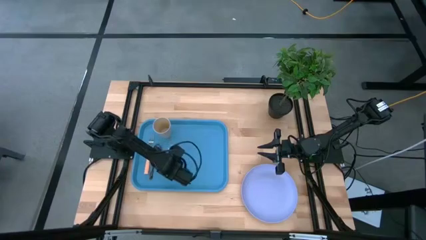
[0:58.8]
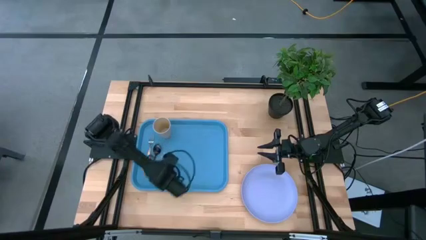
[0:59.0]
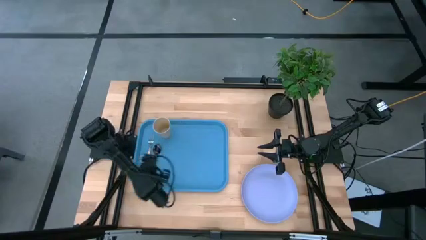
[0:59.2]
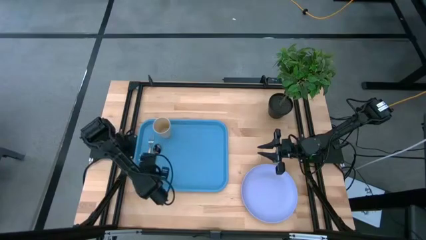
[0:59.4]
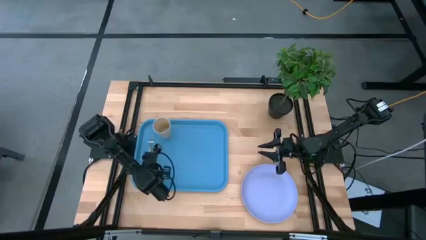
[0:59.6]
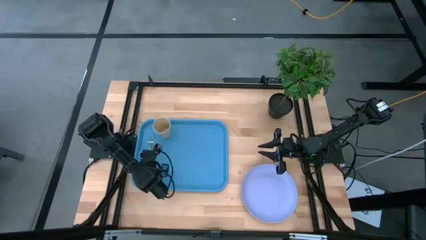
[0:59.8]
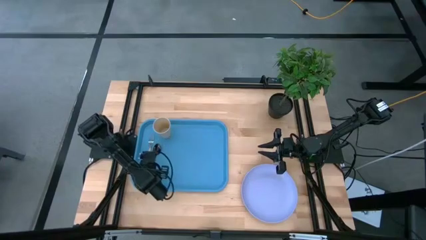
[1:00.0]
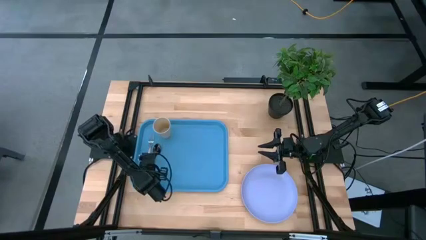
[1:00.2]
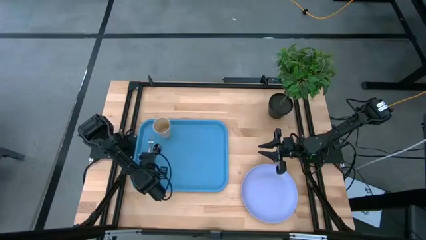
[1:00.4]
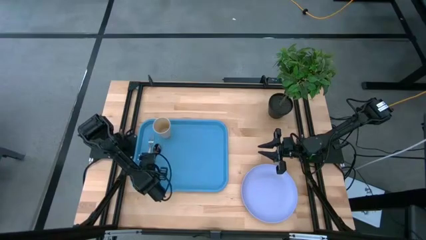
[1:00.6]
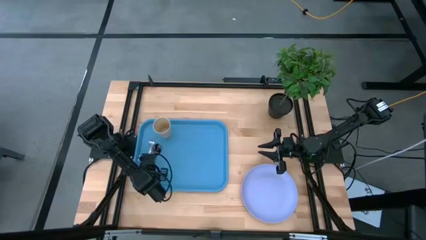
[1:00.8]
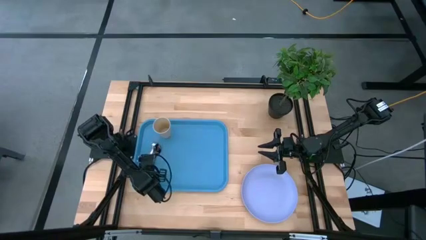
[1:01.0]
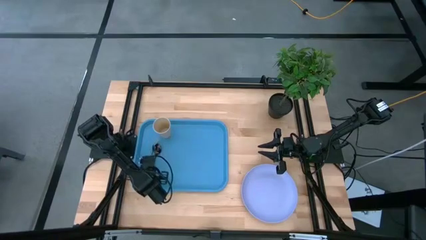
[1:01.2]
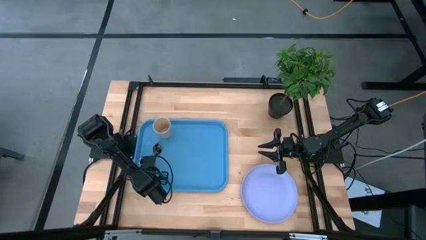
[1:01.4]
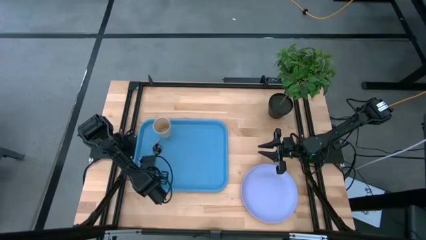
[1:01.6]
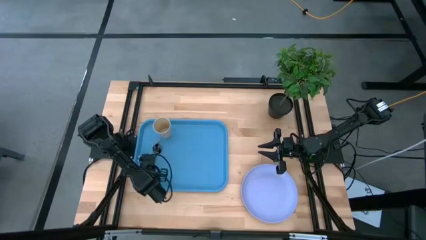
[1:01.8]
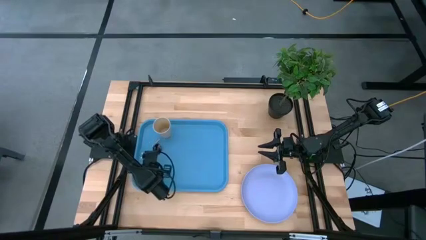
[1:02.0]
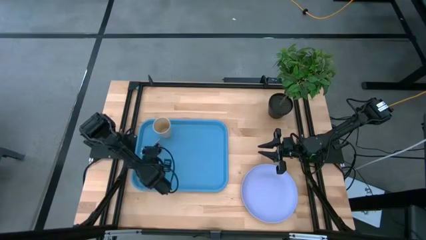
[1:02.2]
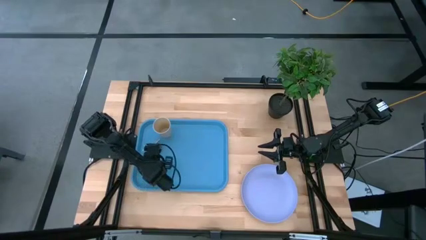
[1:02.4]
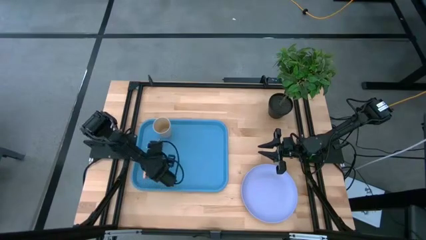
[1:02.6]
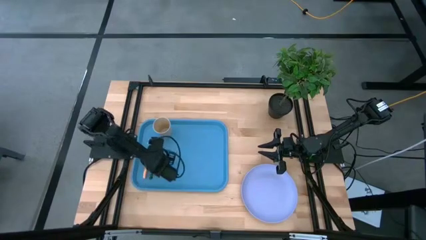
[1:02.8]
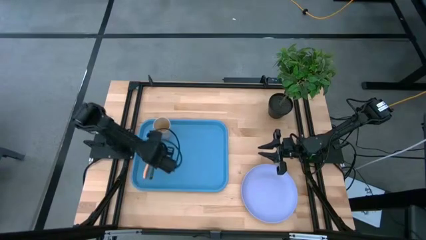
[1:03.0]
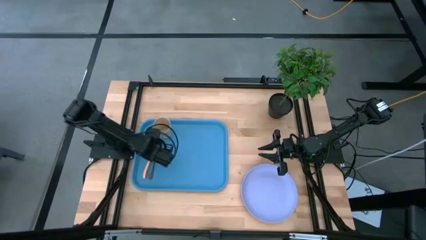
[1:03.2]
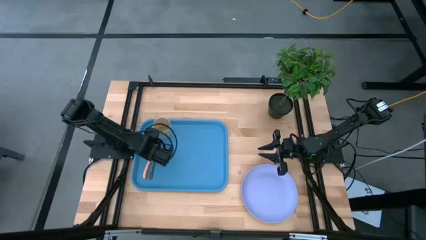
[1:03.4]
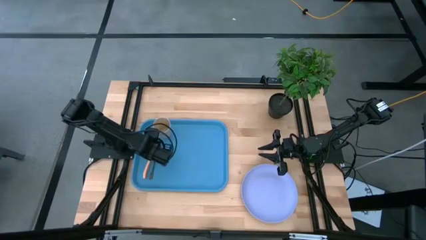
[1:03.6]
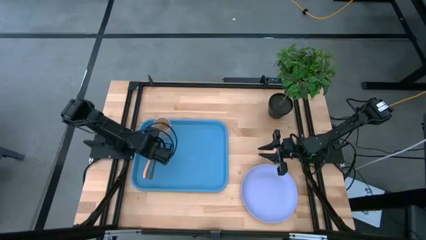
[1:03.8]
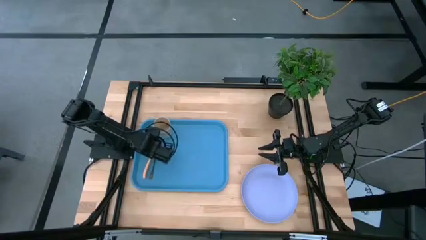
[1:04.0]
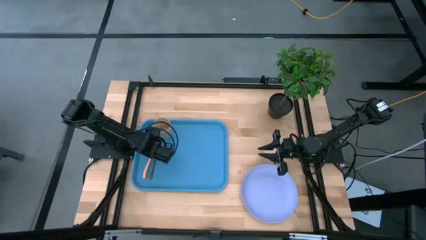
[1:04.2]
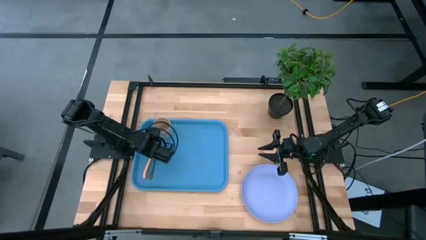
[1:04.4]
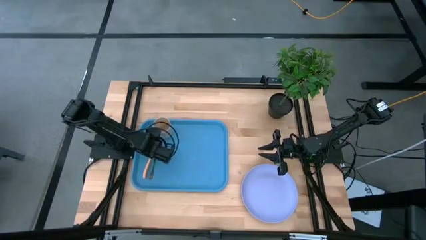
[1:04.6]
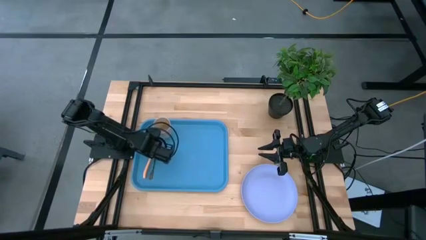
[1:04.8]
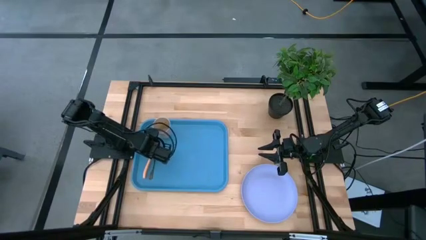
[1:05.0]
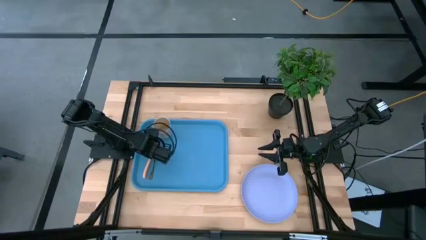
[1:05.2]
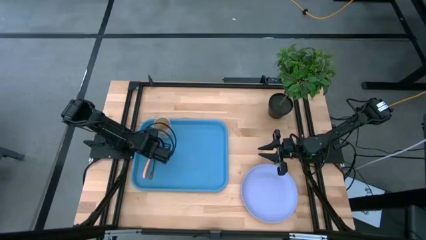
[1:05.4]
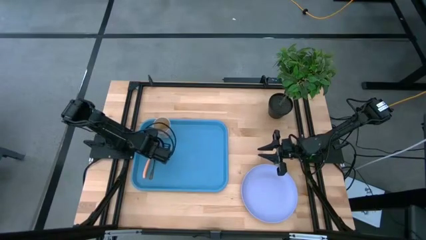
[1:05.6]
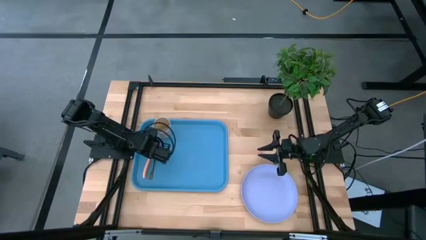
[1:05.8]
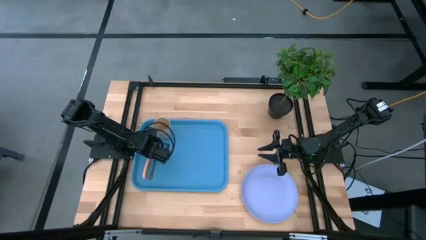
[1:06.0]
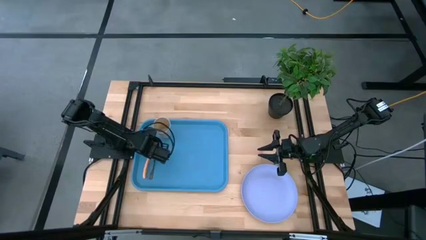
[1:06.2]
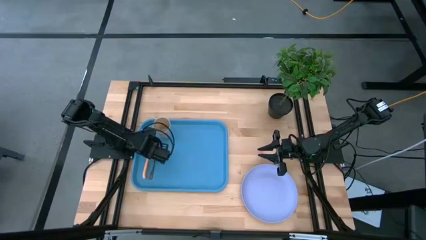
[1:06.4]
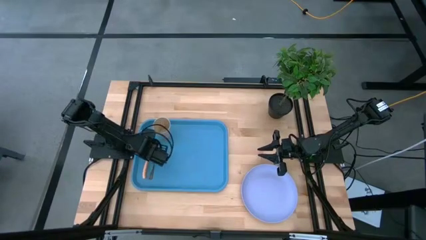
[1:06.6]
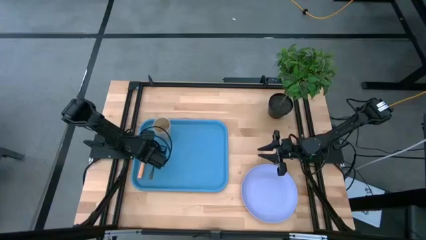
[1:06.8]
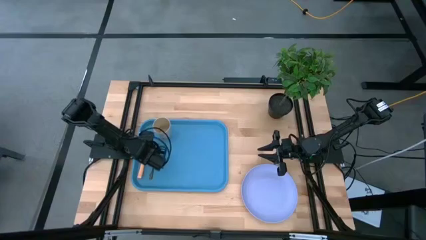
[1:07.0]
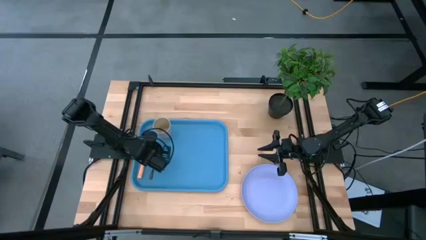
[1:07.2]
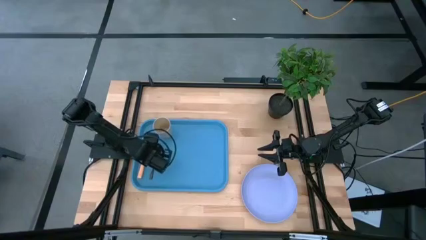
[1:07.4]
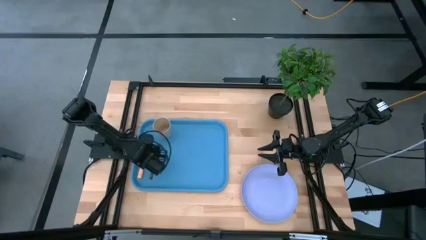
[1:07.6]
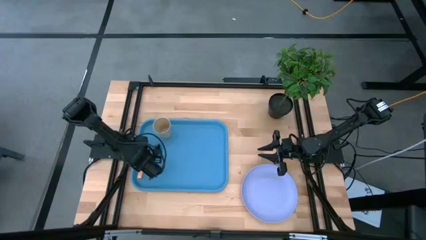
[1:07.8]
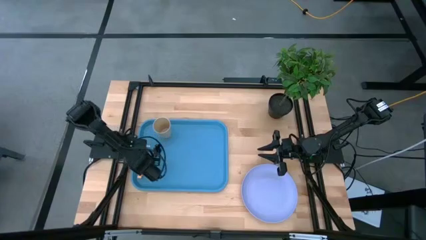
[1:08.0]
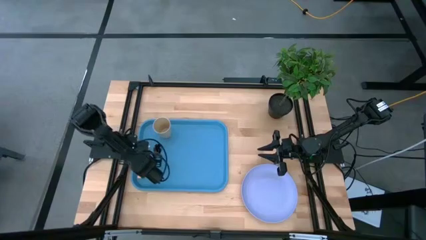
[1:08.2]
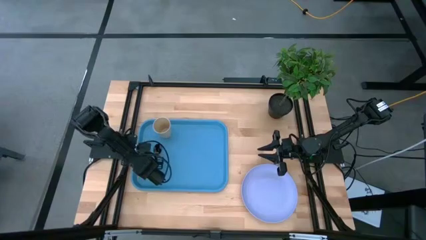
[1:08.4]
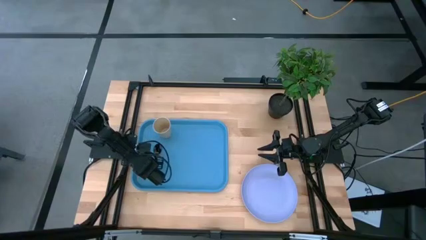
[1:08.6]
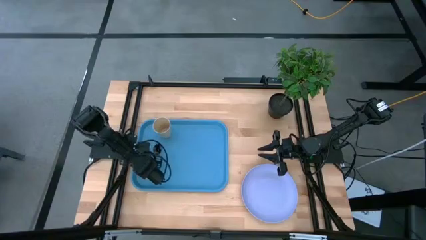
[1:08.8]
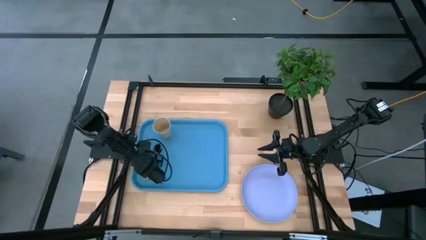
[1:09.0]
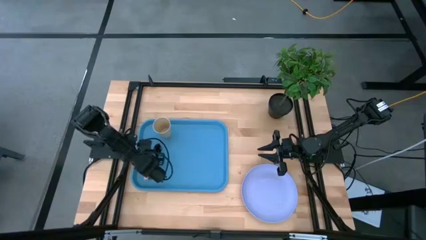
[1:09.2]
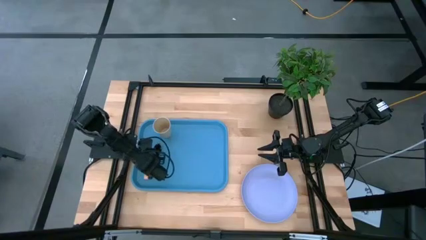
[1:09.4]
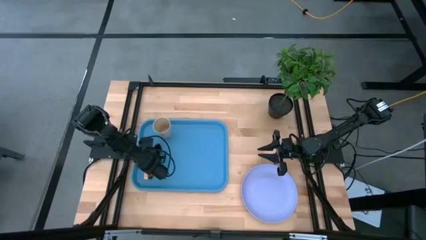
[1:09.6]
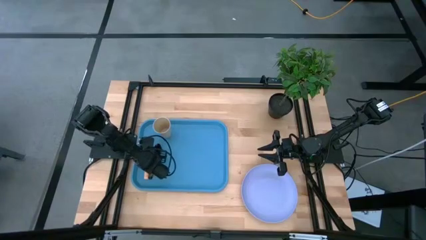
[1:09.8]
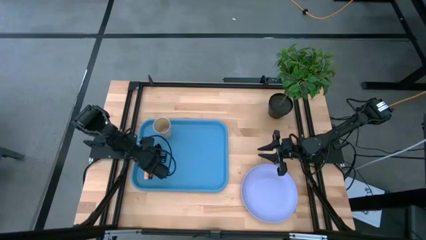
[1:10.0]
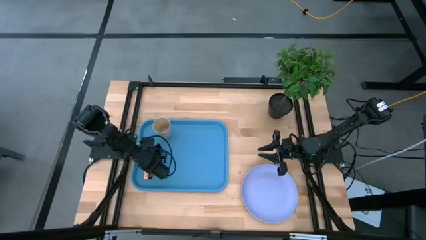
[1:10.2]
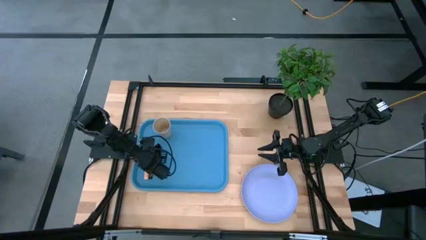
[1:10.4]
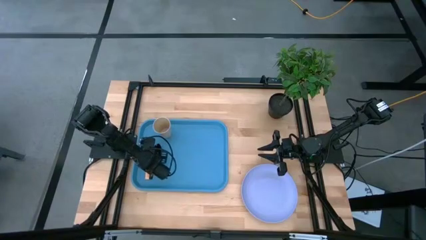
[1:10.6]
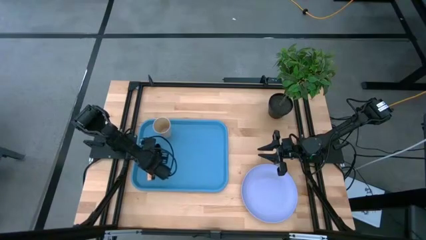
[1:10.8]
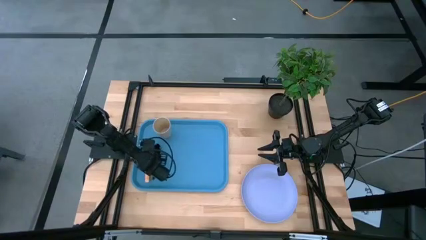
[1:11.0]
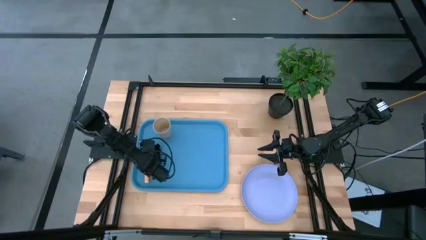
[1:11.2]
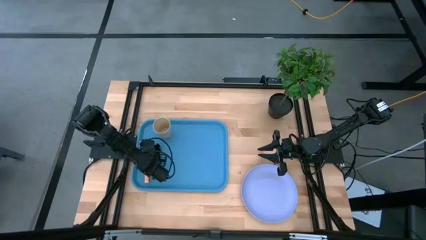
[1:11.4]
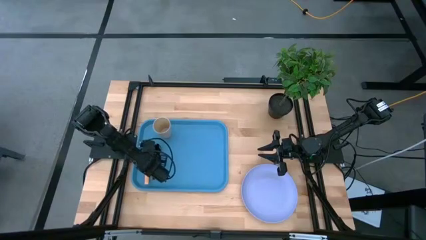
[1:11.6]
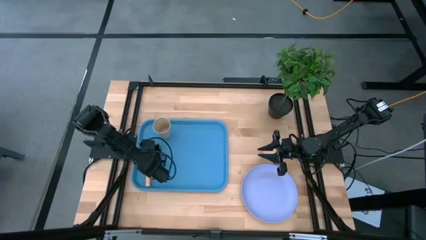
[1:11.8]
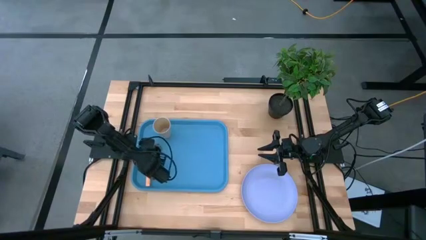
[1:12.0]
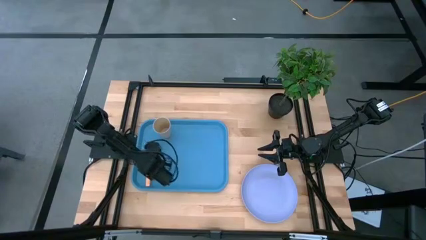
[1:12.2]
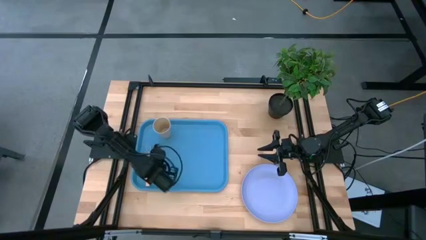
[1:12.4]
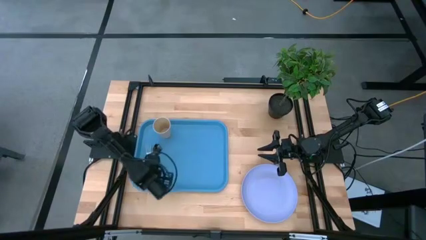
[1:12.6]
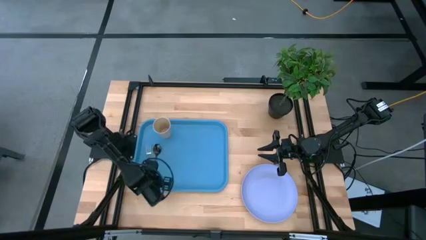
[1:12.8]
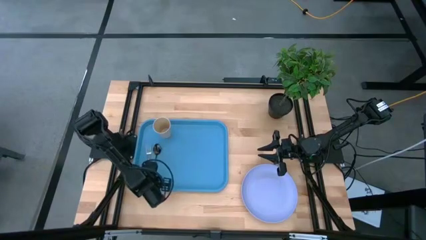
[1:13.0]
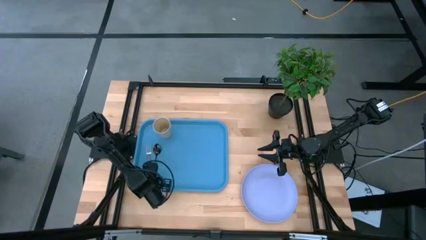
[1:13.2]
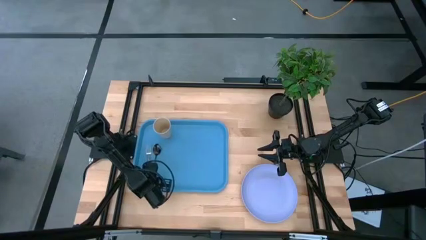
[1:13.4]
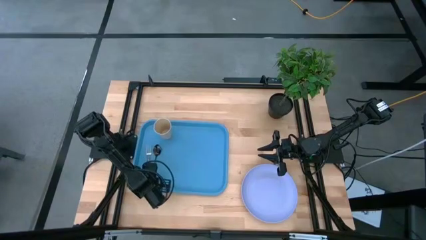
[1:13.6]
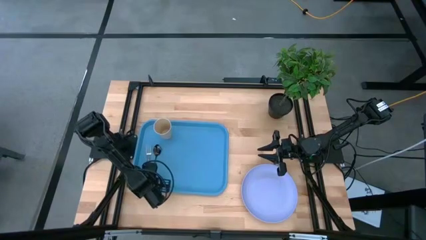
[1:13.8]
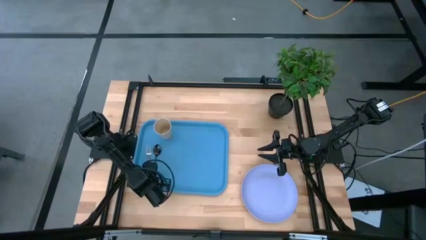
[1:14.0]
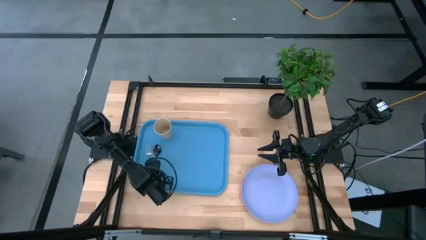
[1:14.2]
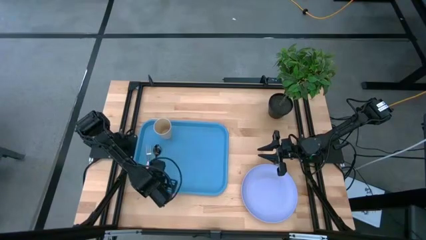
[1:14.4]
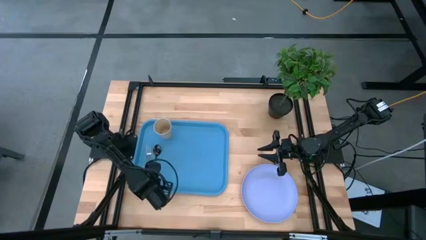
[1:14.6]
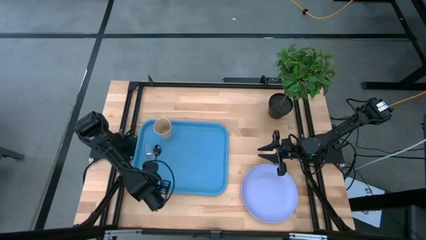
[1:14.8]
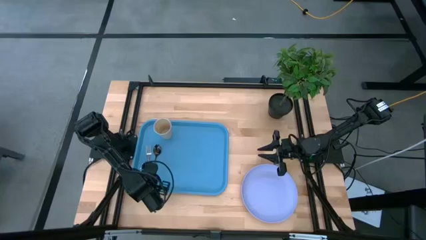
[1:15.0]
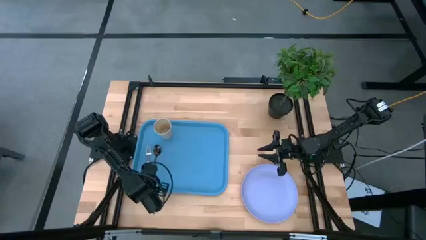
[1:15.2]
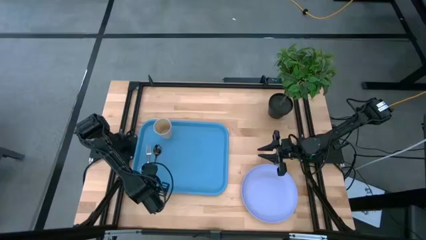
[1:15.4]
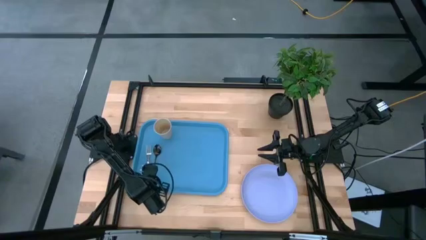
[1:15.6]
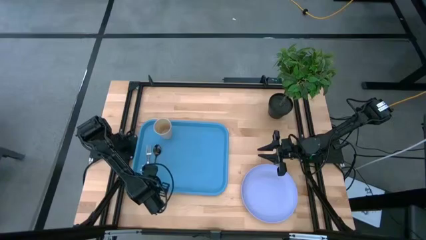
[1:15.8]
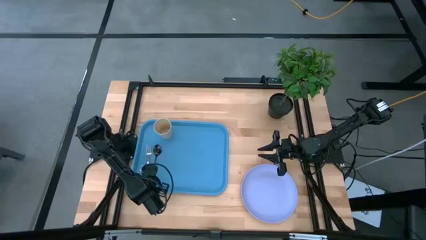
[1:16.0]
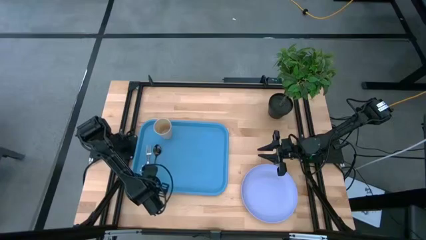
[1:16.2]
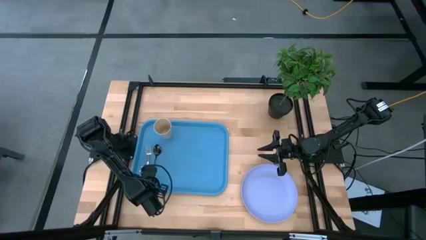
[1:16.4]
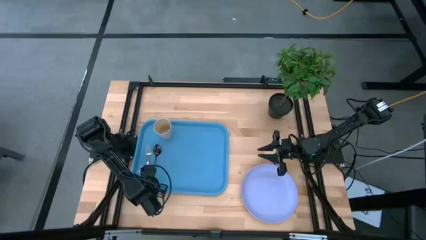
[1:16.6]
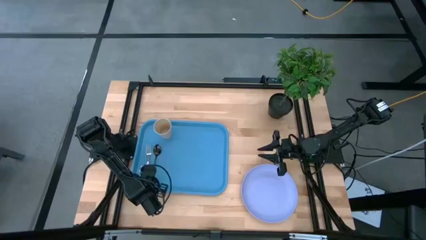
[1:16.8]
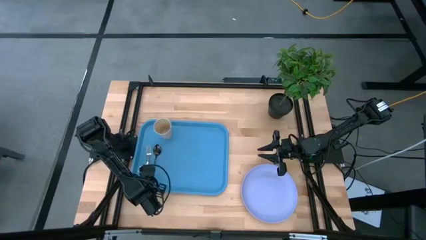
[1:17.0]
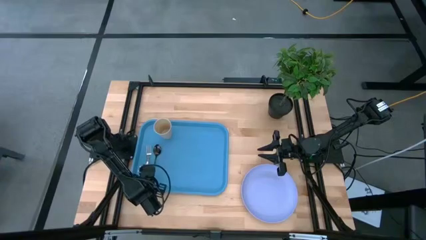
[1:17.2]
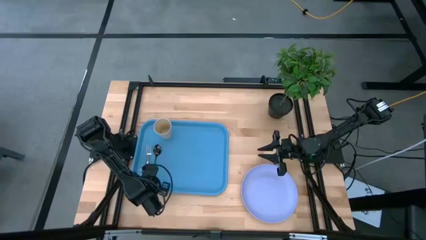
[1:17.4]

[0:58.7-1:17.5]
Task: Pick and place plate/cup/fork/spoon on tray
Adjust the orange fork
